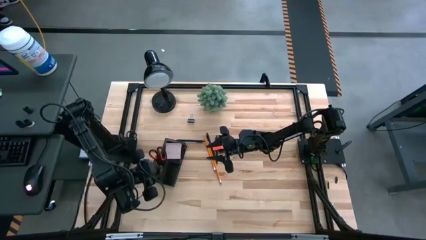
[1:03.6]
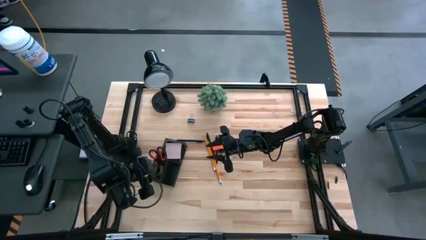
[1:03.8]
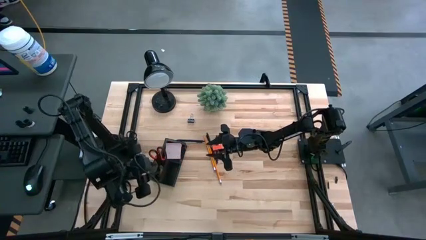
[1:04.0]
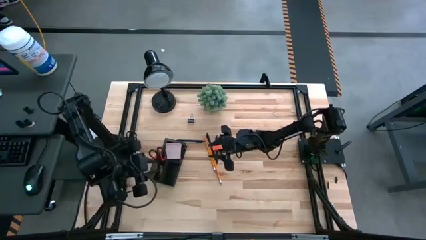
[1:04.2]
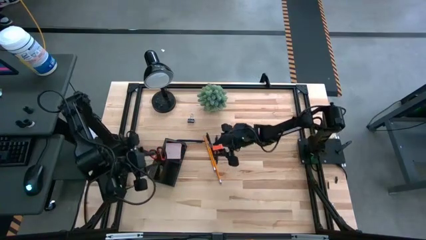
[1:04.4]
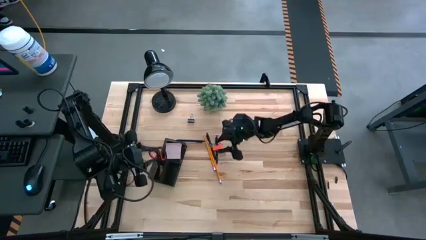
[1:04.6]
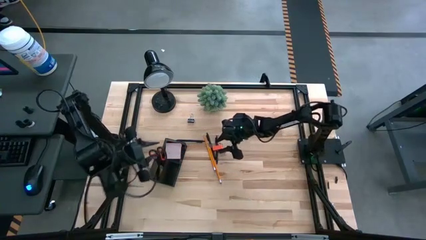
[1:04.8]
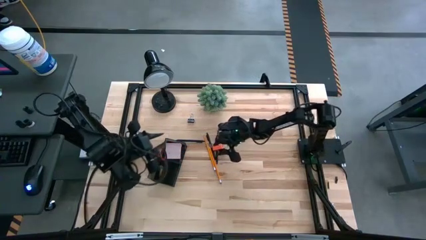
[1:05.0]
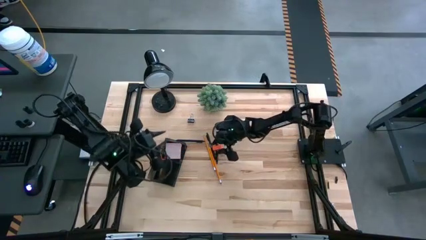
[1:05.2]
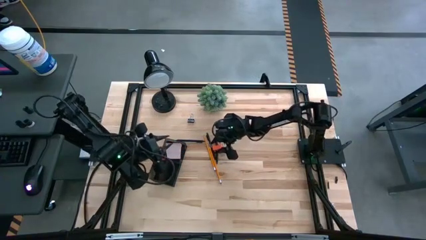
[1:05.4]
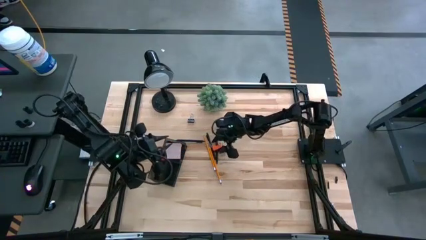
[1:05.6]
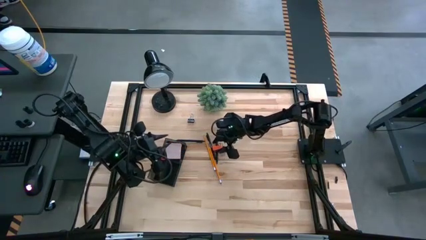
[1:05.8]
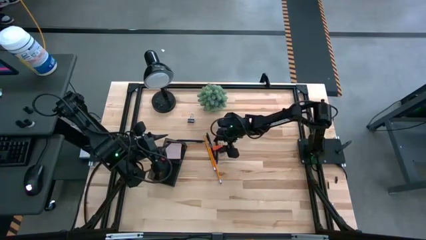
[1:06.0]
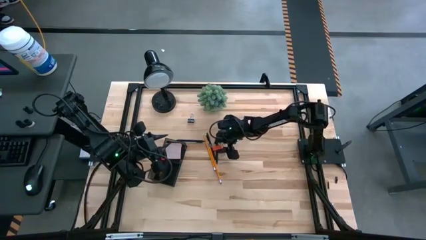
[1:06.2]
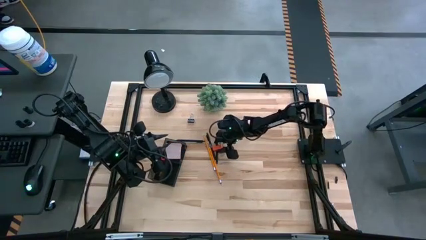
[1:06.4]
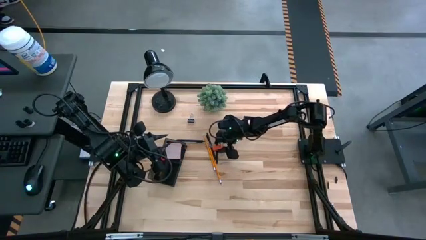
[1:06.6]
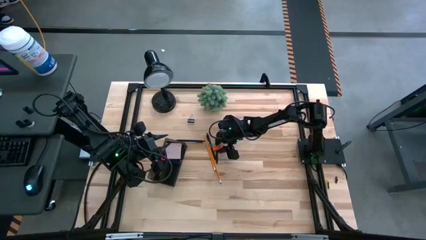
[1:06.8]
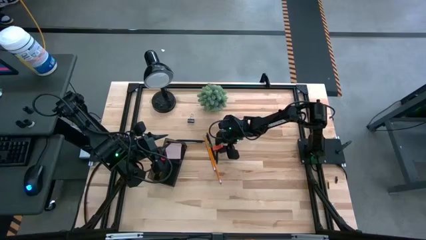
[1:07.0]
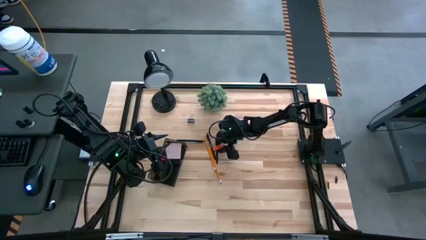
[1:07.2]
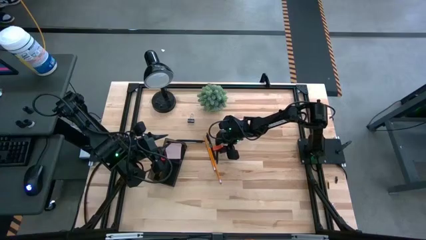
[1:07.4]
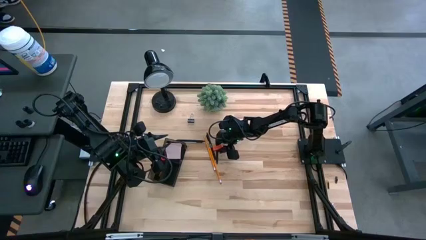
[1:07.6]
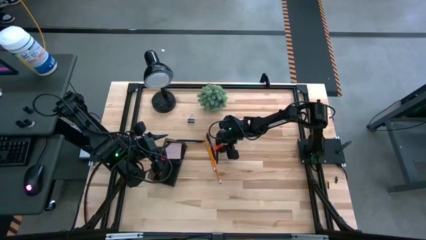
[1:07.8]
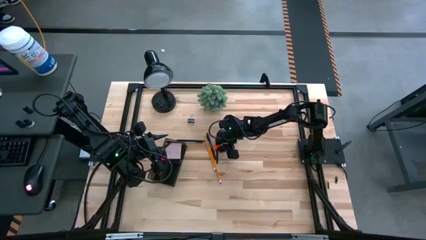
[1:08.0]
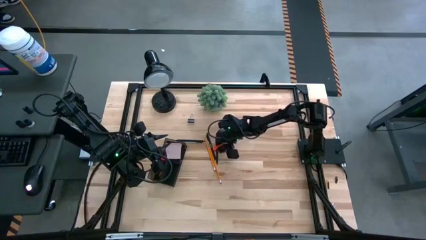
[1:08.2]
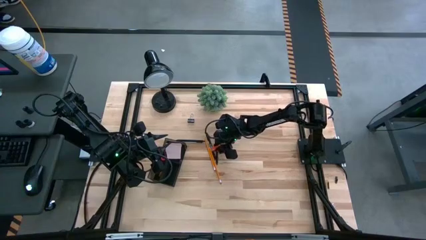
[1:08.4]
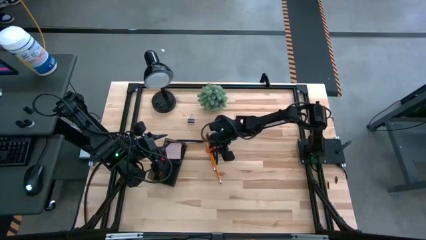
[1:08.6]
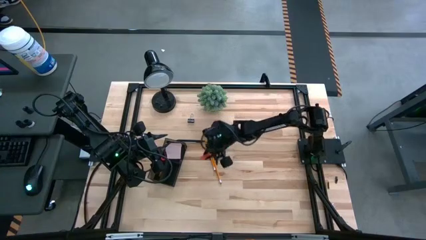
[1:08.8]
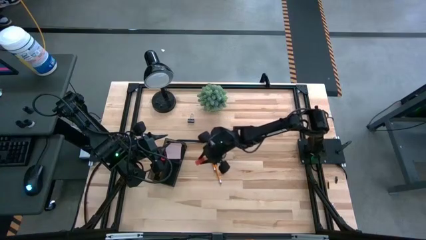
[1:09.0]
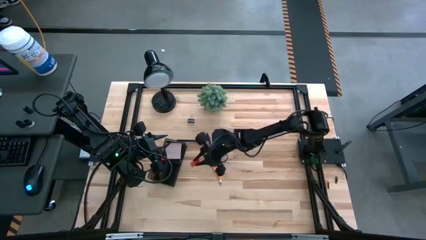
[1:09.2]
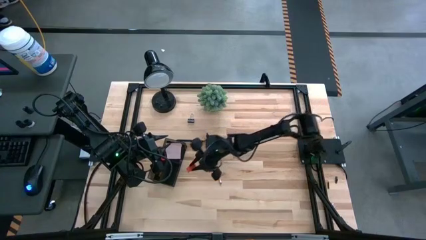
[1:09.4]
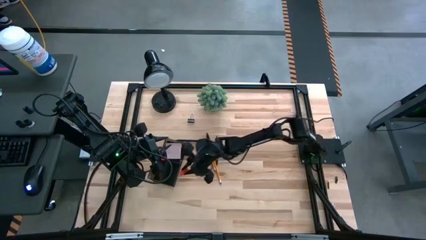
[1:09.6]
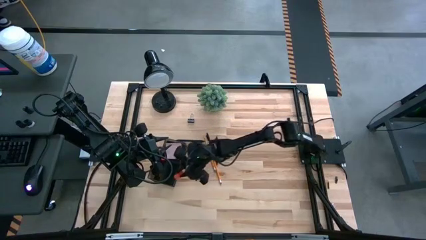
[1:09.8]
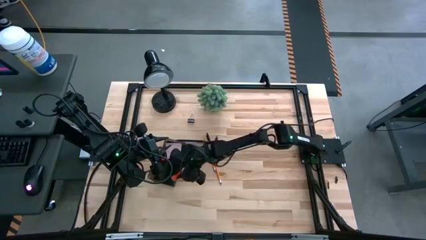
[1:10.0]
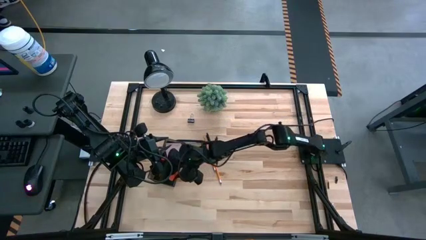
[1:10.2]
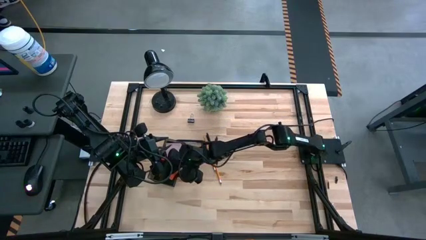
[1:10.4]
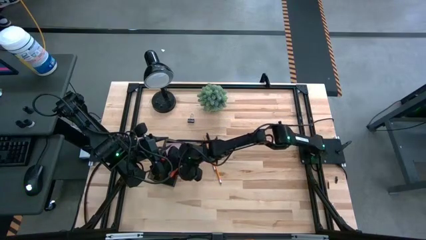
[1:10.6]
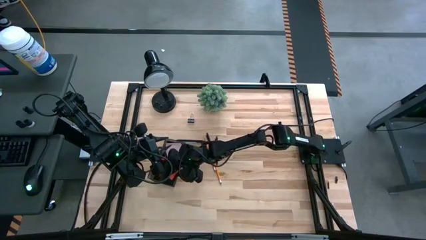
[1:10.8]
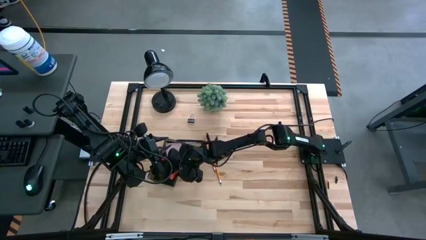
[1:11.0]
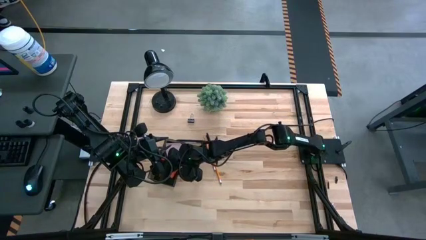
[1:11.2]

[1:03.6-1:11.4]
Task: Pick and place office supplies into organizer
Put the orange eraser into the desk organizer

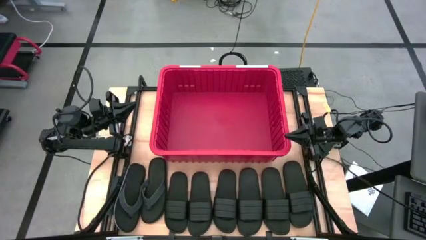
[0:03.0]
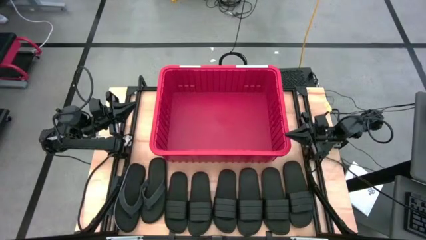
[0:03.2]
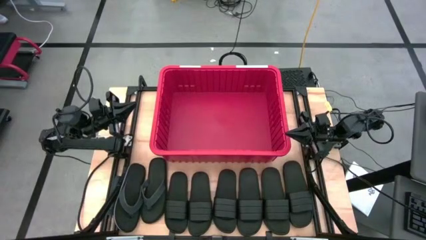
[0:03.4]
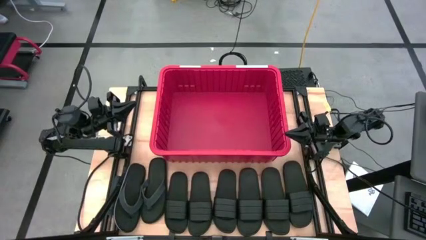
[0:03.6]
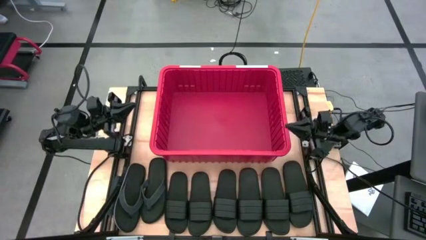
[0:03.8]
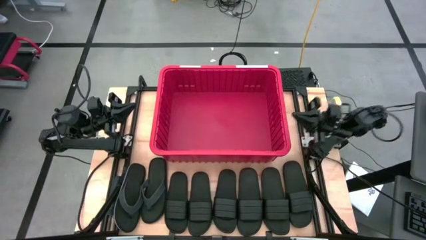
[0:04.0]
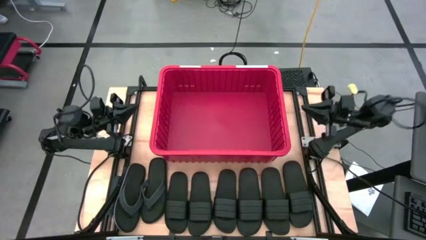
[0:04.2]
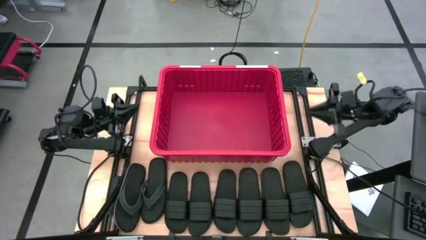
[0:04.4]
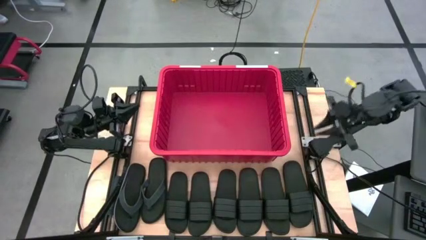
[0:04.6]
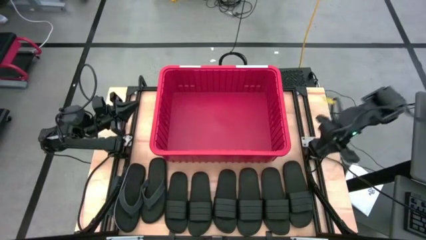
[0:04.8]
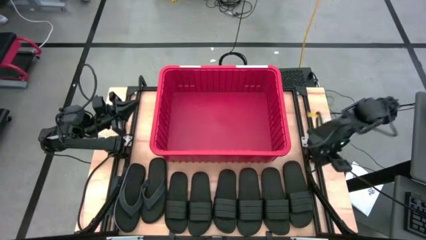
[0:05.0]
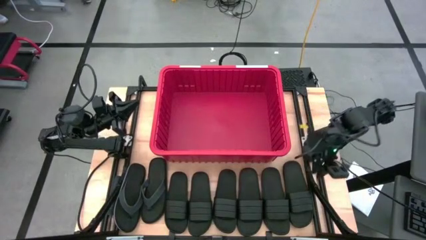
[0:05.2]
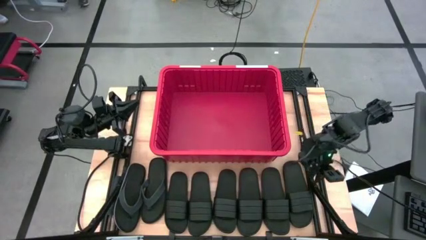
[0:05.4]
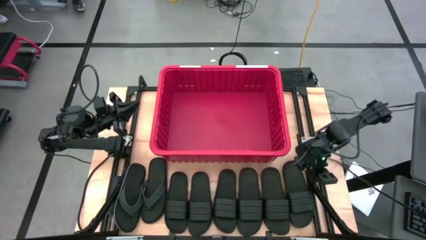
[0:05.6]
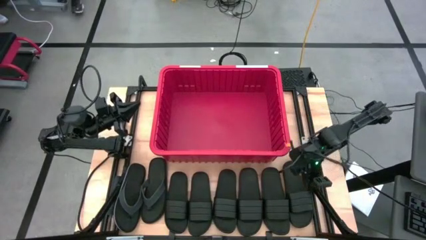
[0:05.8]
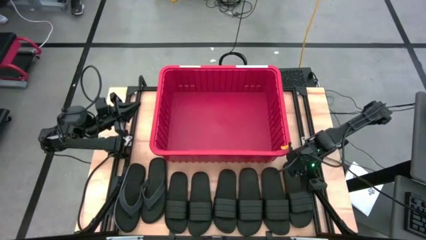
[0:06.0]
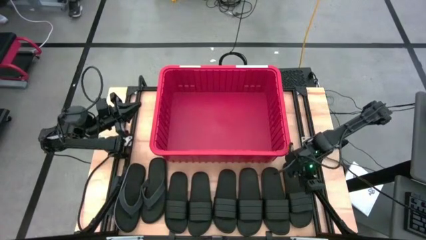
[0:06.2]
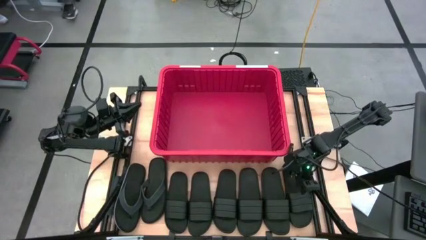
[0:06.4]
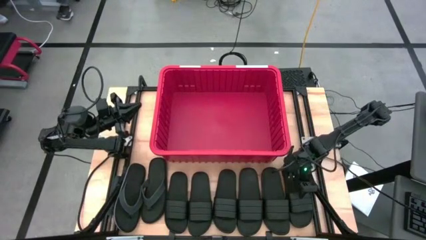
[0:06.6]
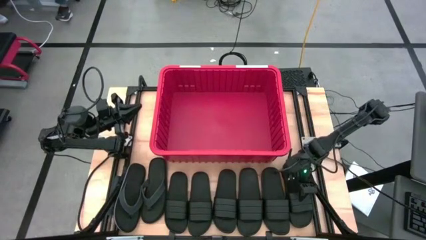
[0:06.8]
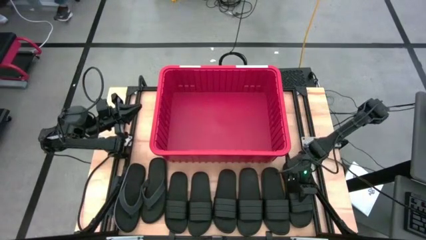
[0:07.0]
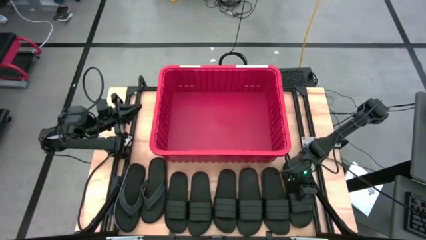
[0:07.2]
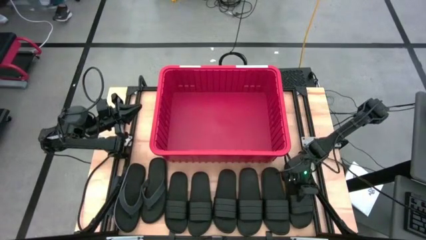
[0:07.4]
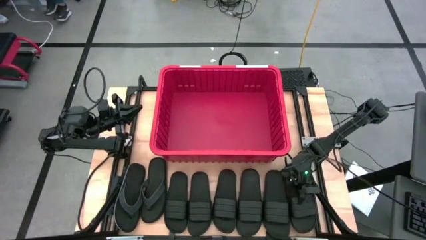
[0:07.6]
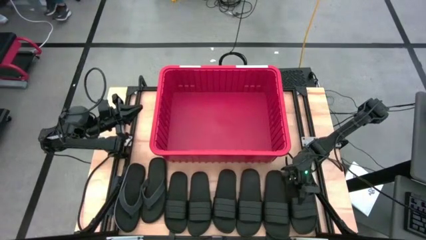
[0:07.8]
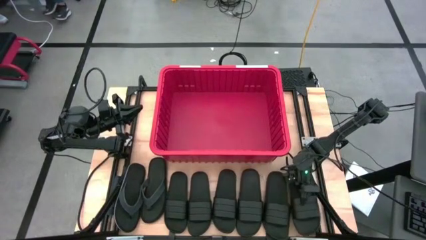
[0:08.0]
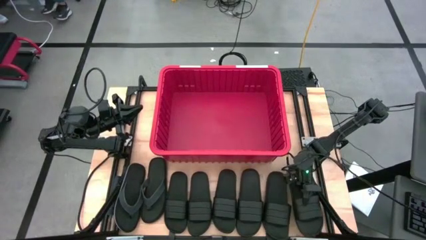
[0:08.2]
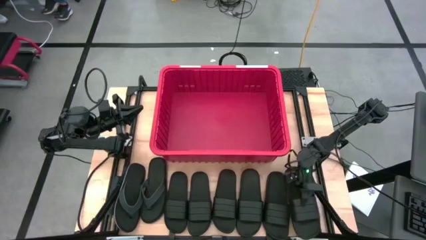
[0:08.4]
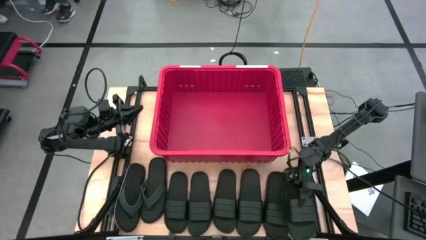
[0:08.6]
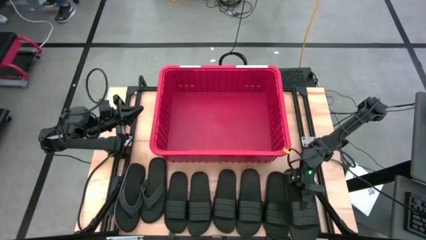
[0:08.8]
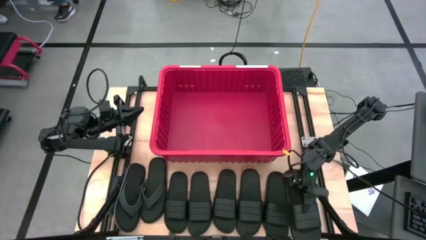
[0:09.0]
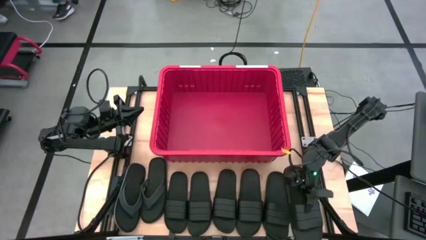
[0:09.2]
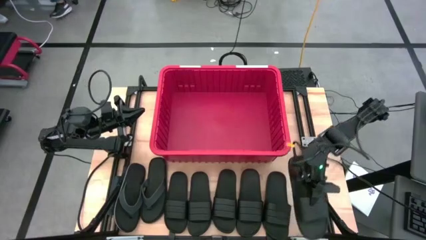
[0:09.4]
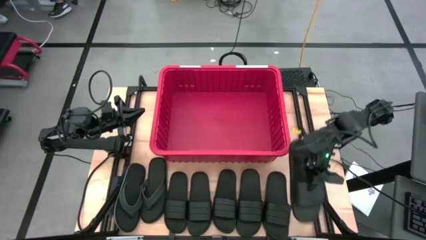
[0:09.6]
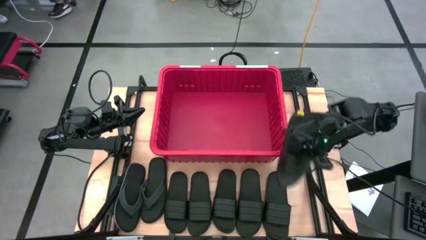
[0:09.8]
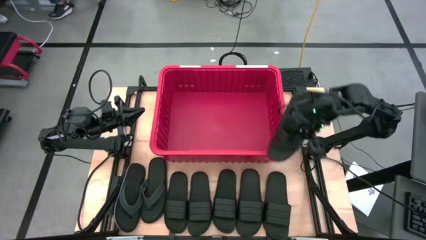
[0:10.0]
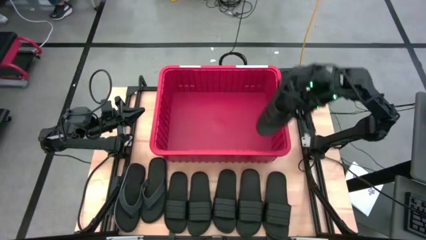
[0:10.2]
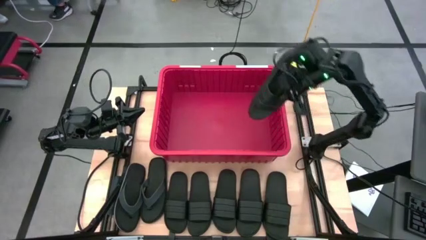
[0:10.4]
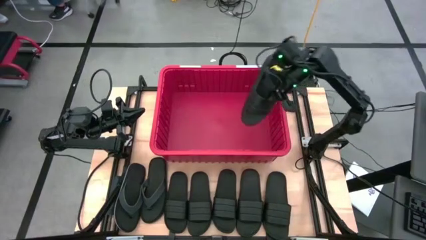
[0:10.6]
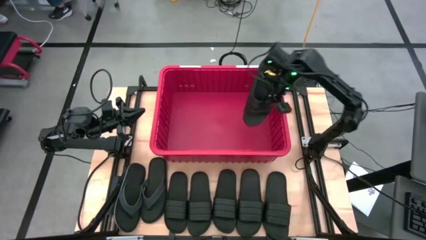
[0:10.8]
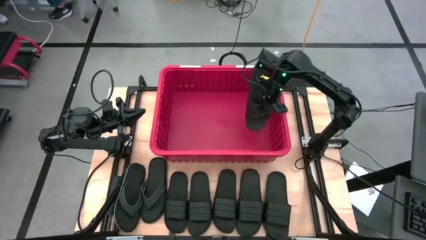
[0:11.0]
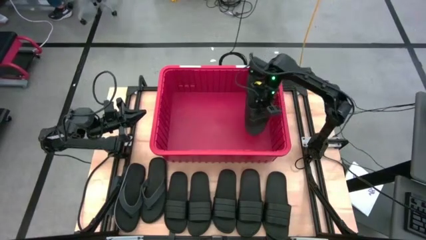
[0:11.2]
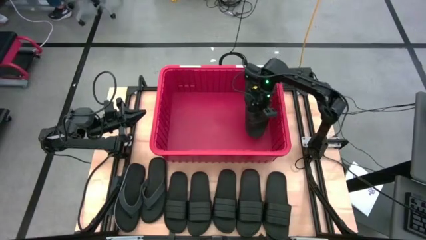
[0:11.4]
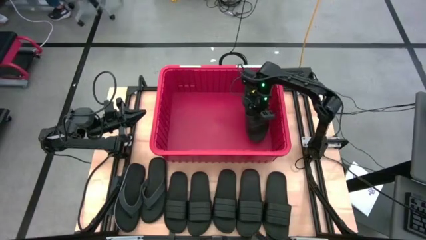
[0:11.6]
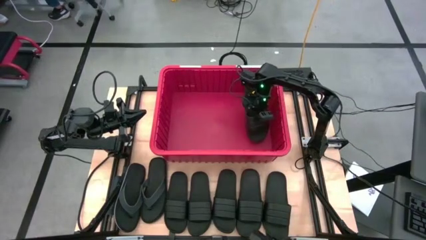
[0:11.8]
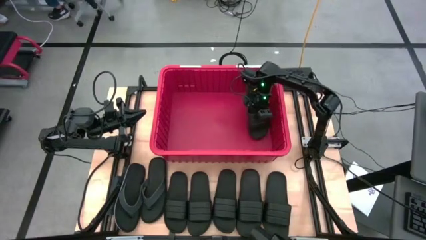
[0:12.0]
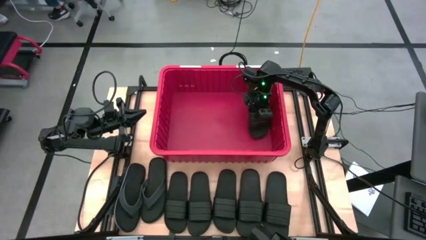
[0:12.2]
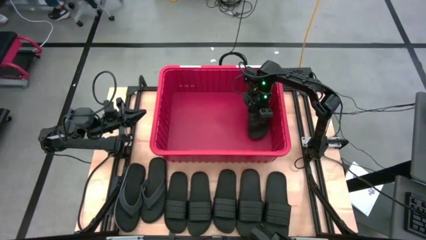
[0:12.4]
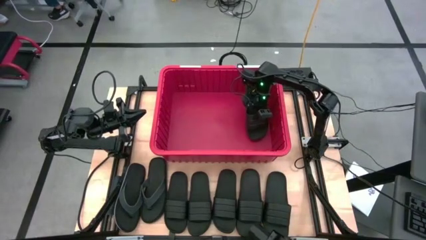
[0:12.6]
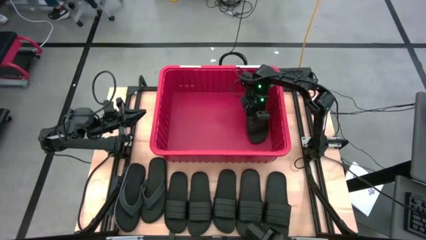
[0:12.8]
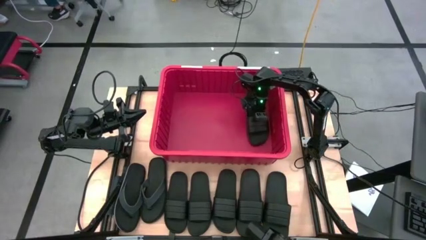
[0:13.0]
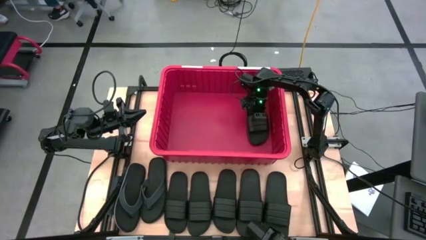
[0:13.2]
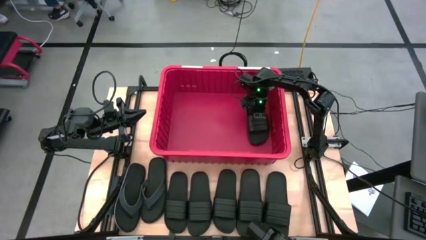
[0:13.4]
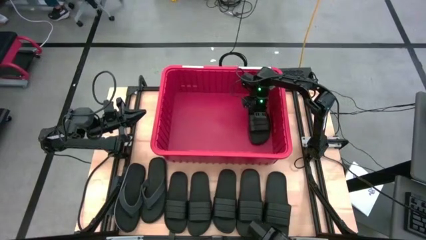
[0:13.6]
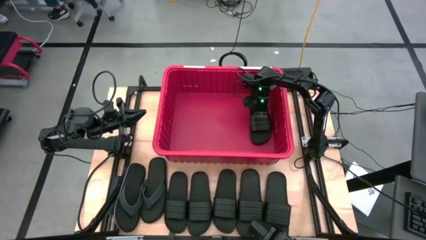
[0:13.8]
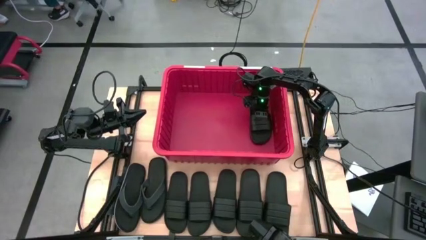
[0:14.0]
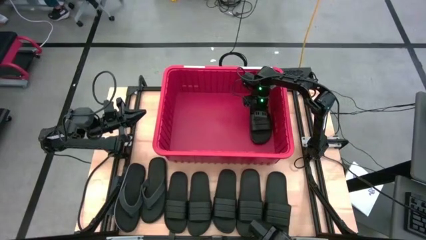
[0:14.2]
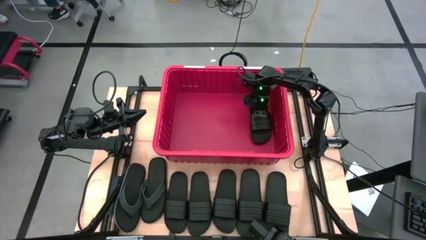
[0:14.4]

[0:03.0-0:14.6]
Task: Pick and place slides into bin
Put the black slide into the red bin
